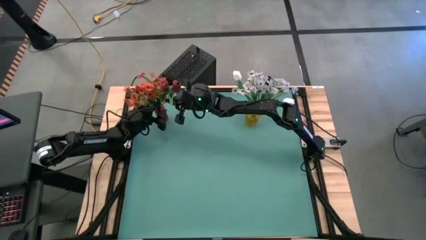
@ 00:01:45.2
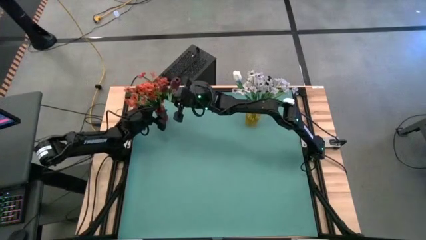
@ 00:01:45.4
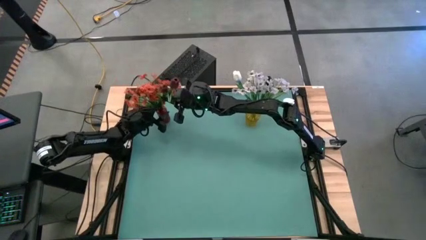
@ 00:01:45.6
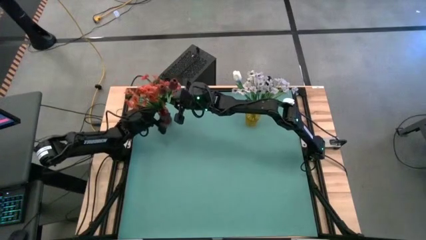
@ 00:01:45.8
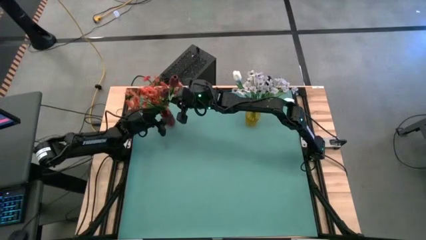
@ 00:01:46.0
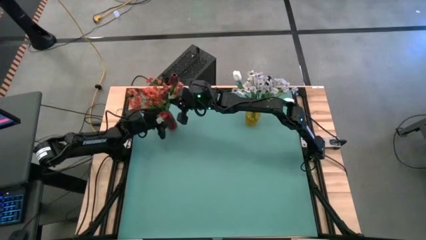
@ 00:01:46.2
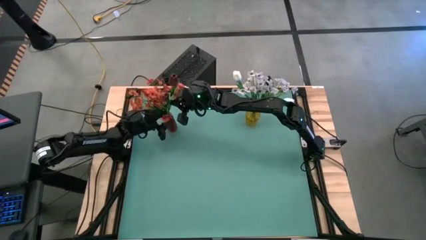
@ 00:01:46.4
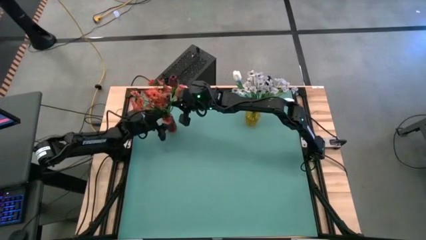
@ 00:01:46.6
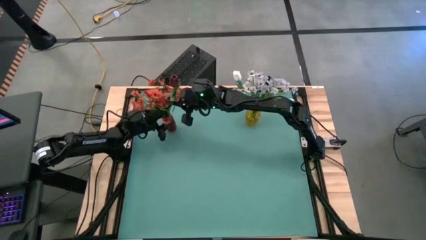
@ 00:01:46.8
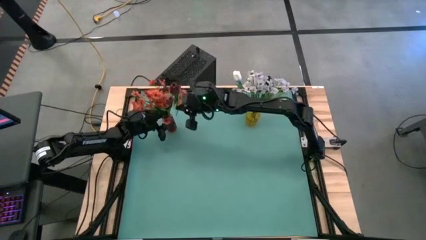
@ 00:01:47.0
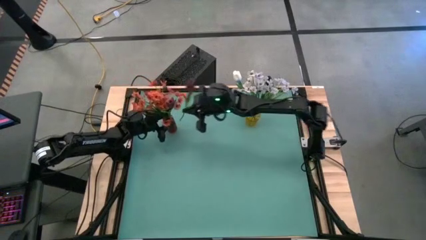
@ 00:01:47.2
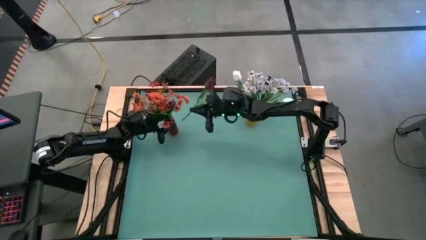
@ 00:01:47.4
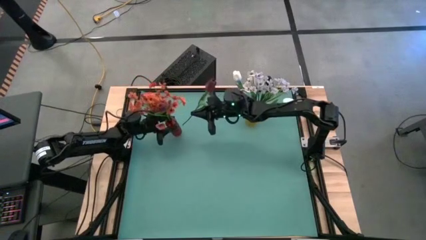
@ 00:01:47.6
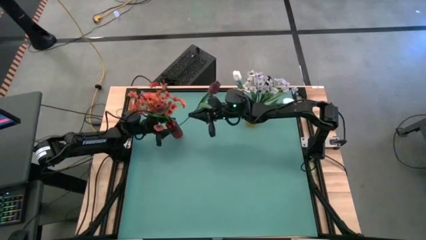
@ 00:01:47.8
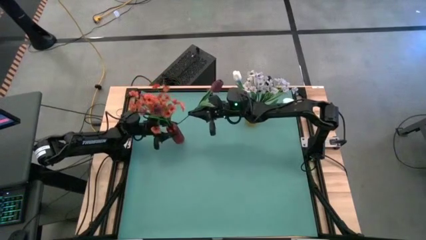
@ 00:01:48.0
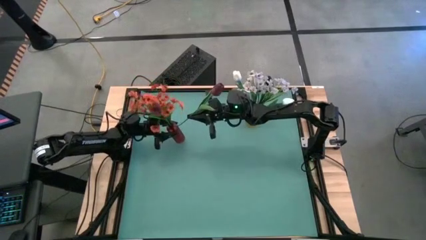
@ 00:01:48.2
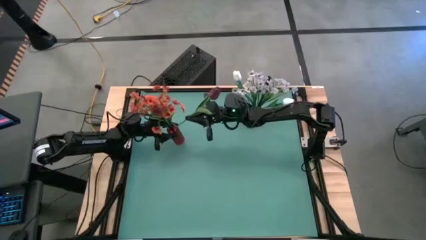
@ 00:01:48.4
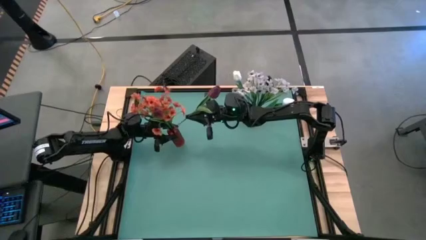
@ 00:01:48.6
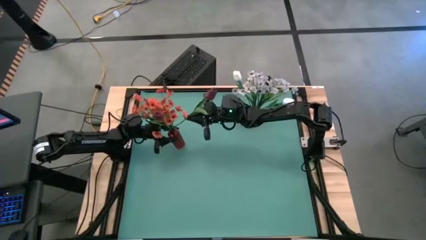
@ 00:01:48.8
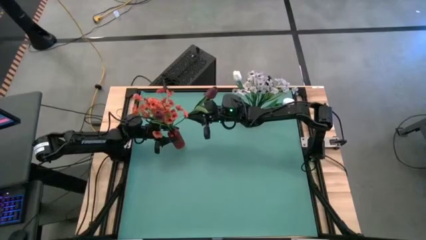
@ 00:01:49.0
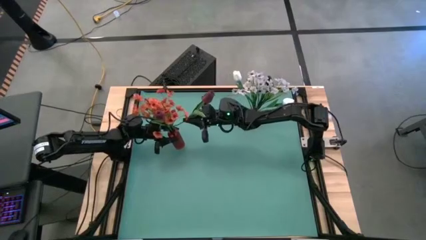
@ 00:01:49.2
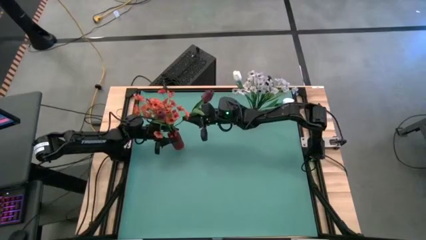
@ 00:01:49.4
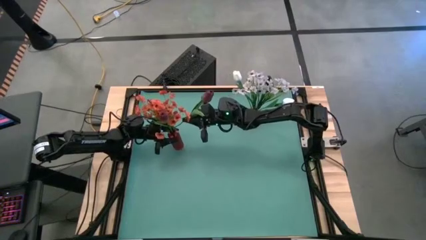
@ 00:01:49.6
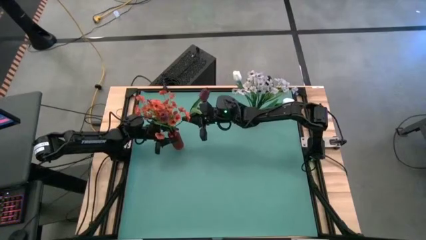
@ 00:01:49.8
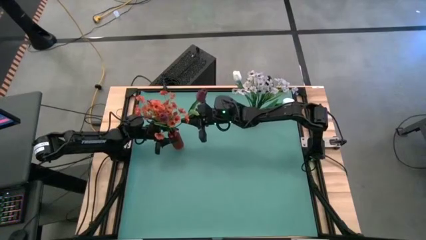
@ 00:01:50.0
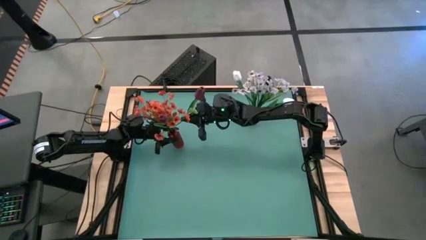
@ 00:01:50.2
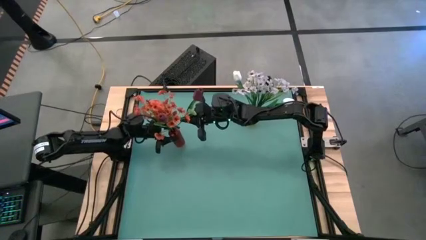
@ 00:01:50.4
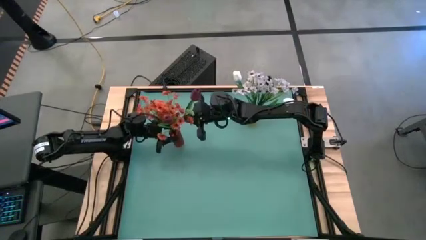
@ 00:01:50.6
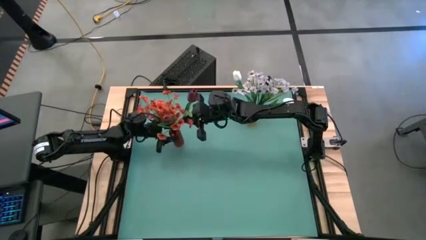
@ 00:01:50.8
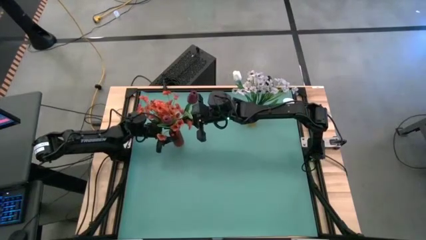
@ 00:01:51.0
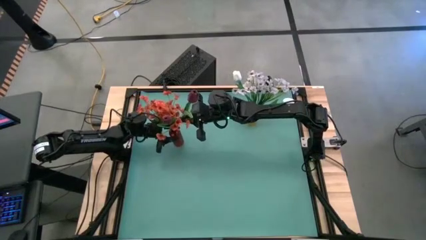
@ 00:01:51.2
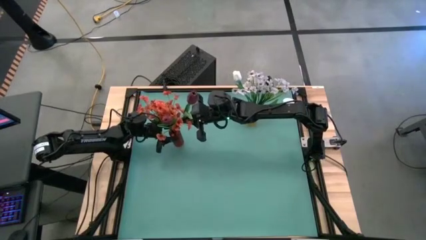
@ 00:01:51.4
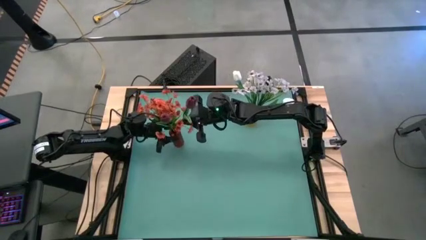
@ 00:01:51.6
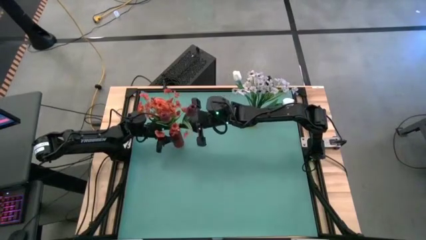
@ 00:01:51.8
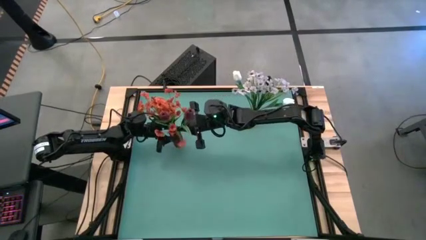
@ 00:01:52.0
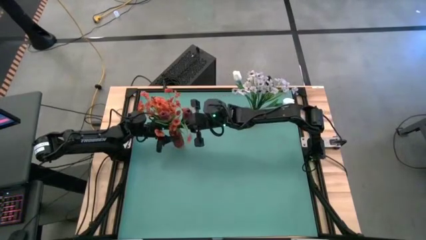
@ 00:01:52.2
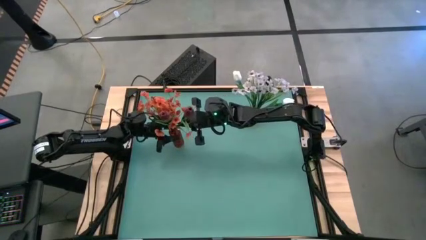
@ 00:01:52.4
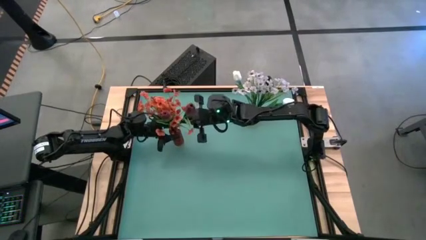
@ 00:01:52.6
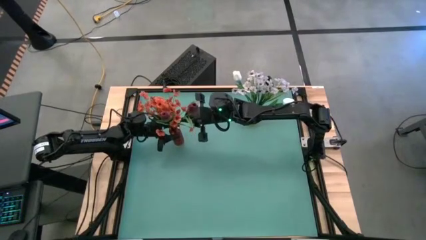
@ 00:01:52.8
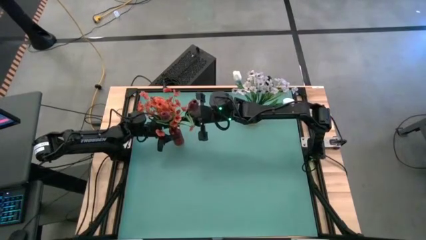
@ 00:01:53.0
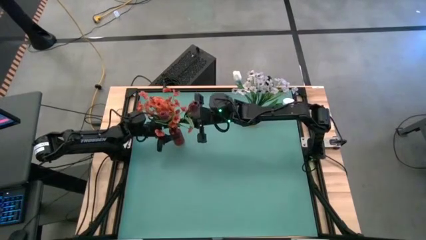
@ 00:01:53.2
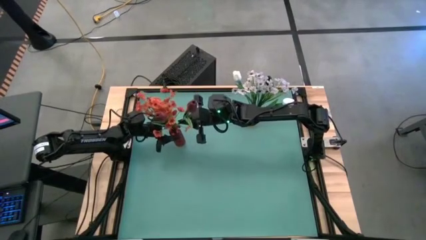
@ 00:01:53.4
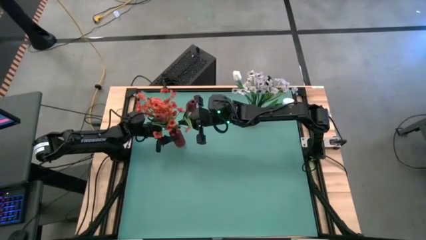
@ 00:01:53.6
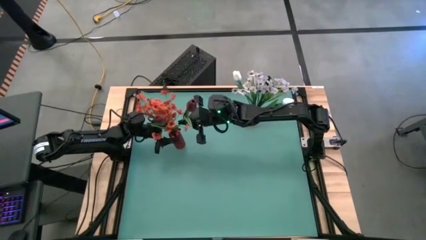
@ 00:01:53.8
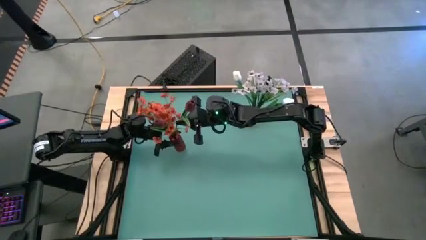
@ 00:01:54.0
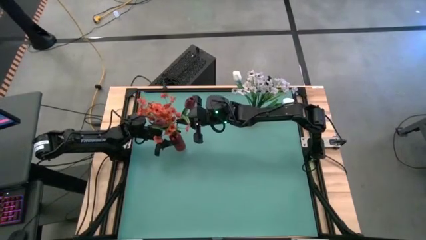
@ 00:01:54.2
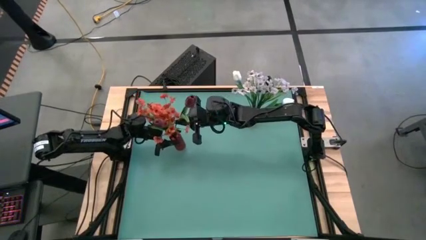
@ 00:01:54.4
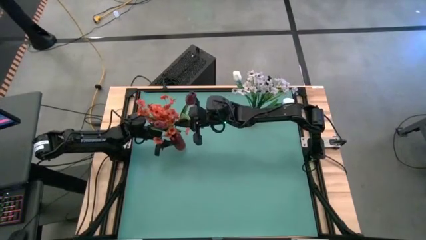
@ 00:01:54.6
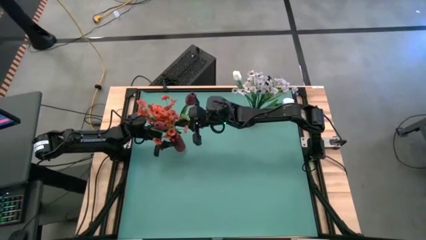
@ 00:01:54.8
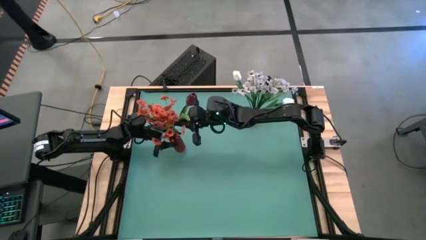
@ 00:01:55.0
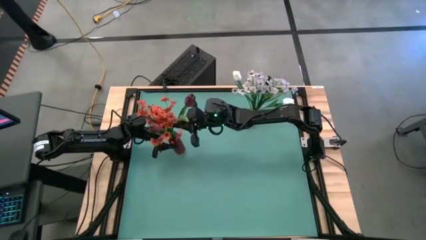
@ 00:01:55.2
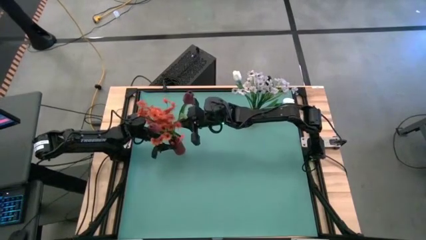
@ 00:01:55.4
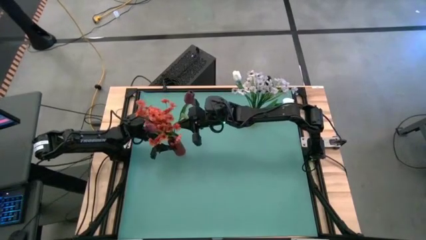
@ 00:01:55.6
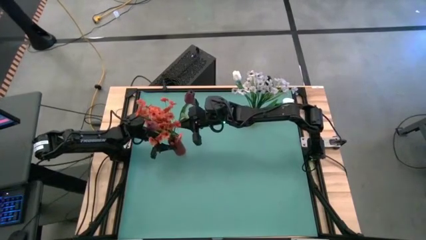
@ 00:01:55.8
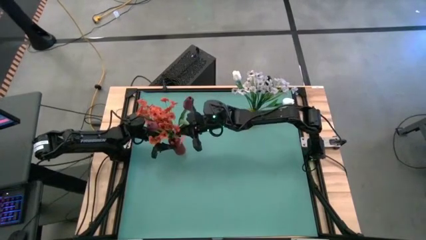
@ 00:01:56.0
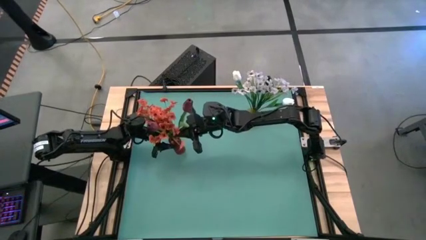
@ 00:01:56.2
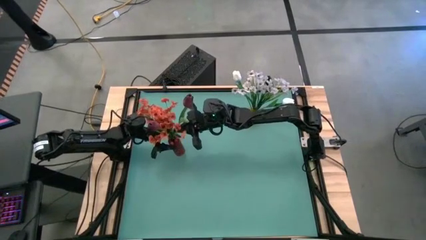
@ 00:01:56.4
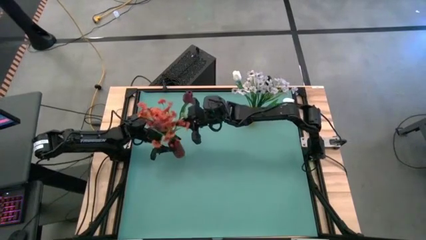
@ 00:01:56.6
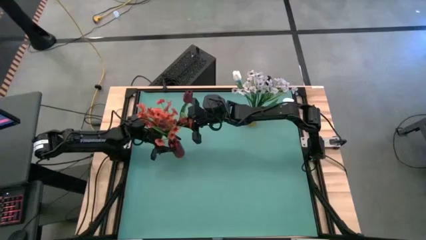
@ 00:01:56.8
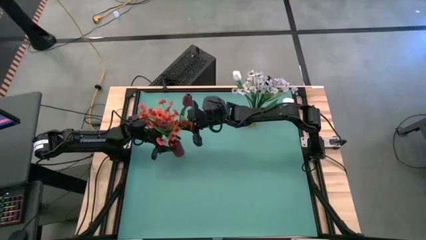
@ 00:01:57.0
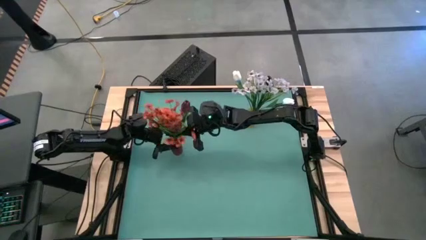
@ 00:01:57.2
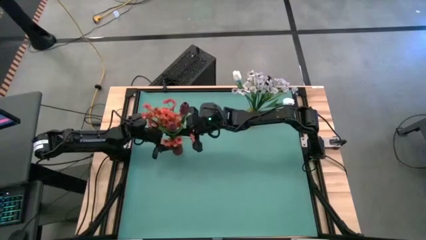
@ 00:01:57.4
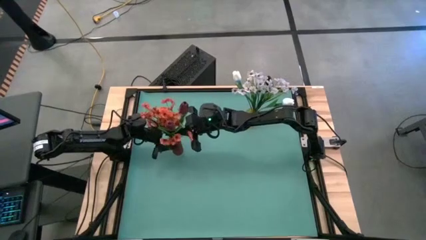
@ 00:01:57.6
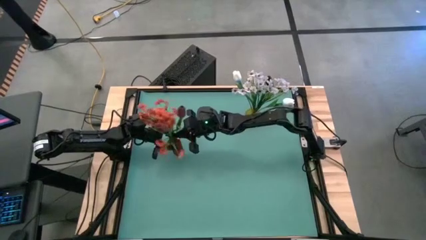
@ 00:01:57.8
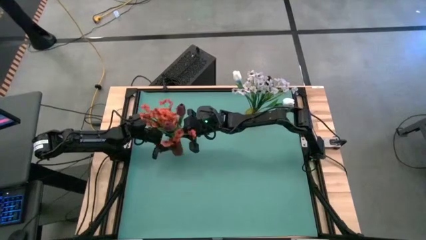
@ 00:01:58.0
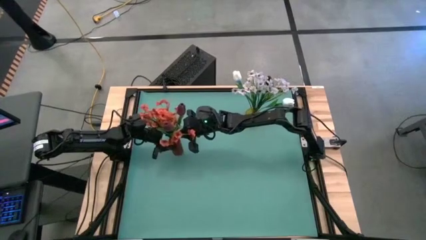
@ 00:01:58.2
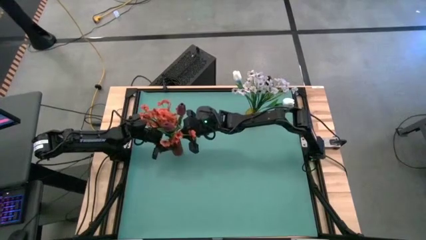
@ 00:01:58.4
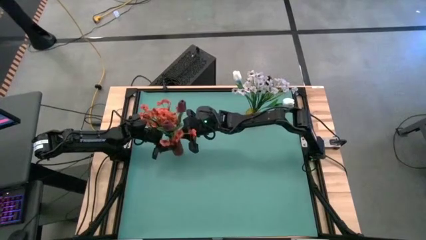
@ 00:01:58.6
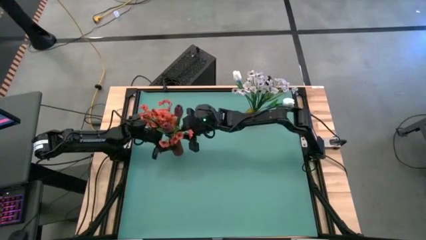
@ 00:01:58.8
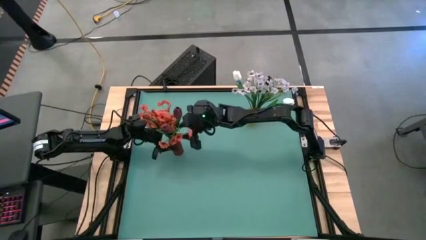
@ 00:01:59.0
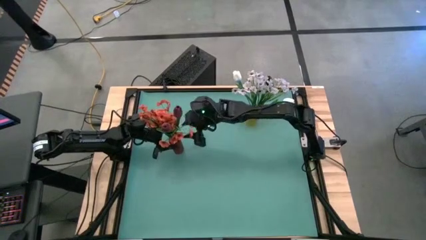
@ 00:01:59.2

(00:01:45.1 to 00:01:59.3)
Task: Sort flowers into vase by color
Put the dark red flower into the red flower vase

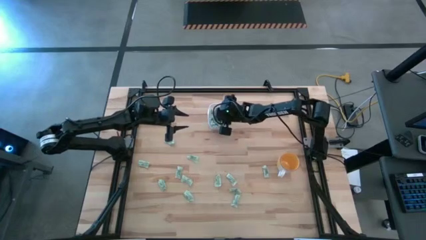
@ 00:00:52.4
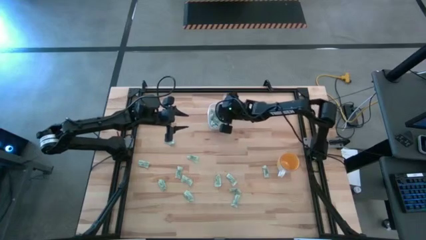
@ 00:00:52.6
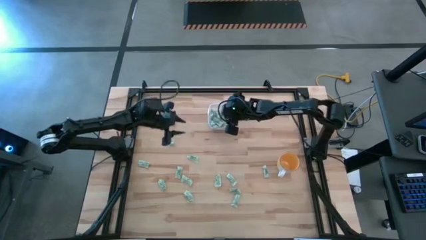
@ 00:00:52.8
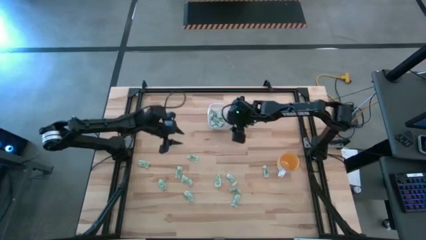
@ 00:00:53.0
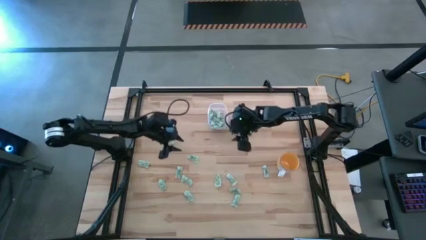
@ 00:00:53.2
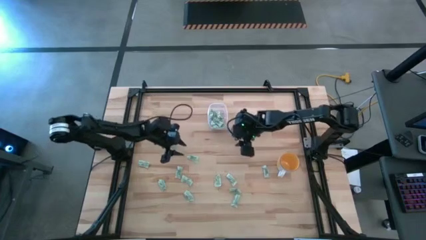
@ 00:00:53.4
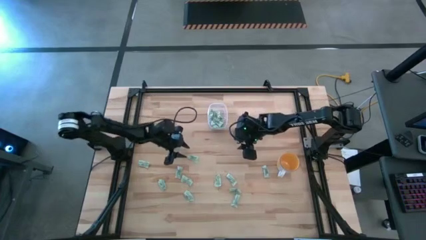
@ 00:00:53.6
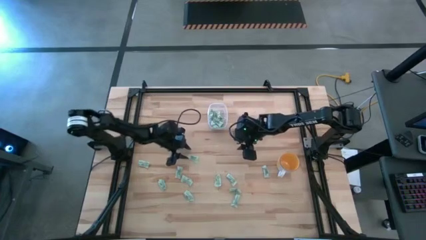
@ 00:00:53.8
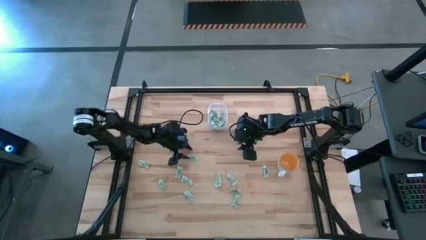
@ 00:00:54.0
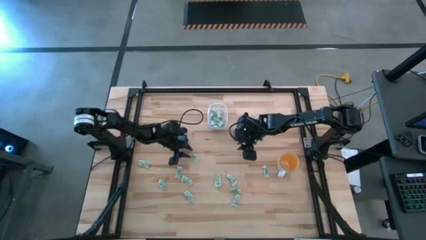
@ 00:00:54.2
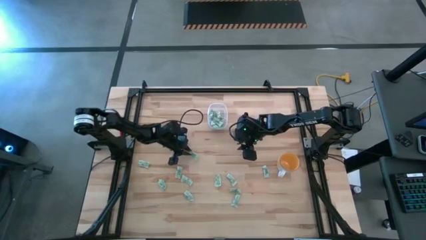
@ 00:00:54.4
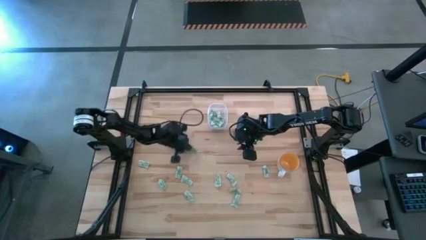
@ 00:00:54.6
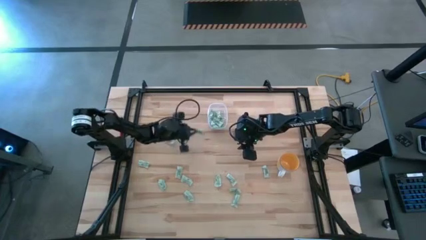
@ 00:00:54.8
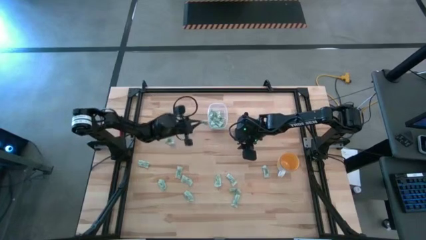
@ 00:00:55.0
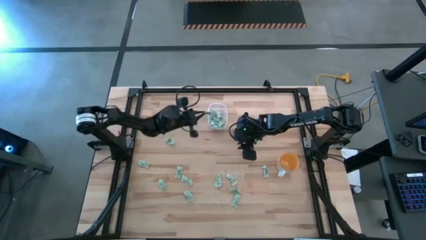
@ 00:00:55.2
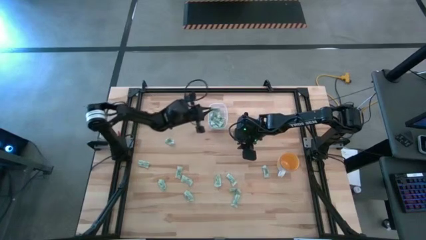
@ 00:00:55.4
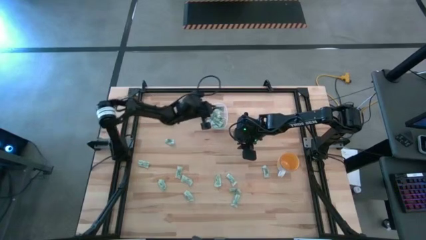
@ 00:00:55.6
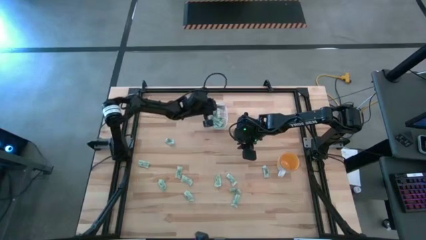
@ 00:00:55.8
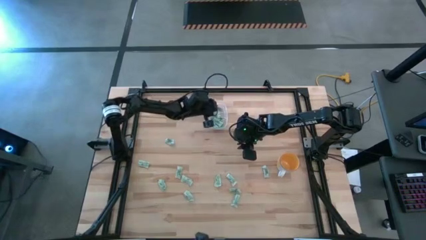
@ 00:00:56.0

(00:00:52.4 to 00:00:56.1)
Task: Pick and place Stevia / Truvia into bins
Put the green stevia packet into the transparent bin
